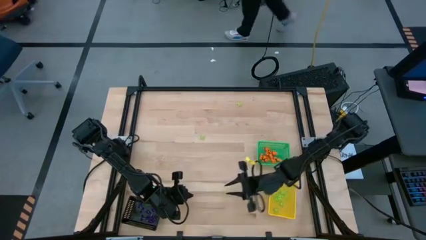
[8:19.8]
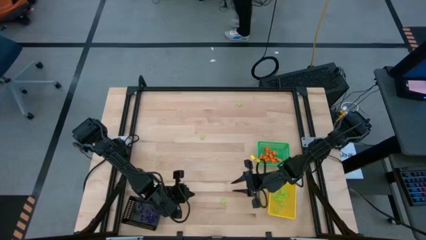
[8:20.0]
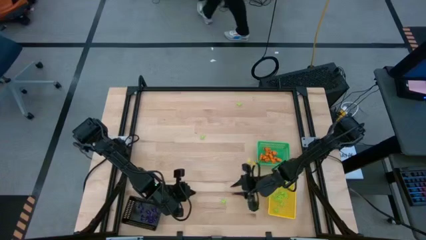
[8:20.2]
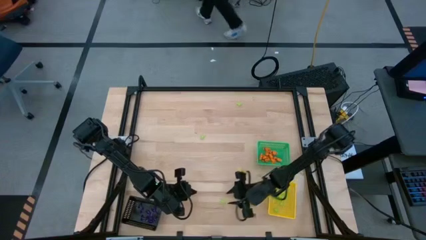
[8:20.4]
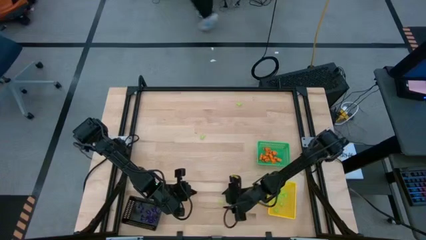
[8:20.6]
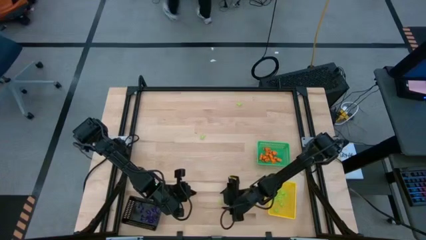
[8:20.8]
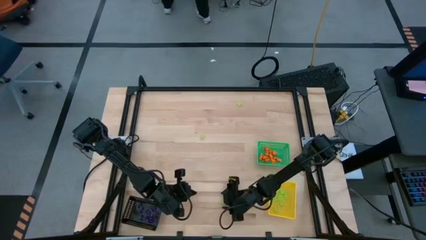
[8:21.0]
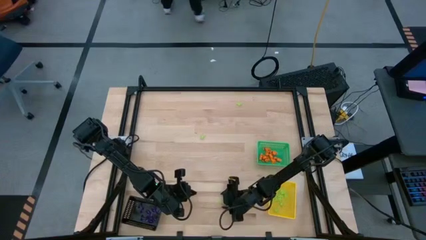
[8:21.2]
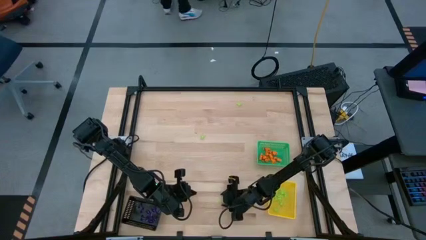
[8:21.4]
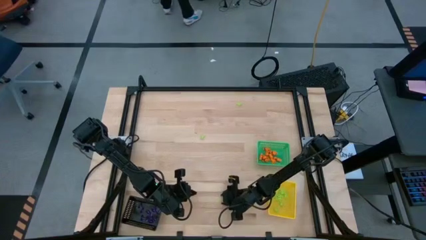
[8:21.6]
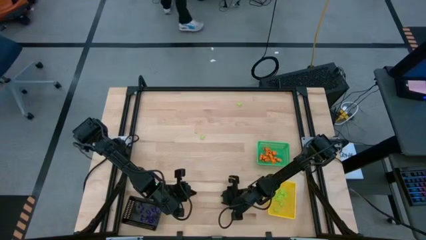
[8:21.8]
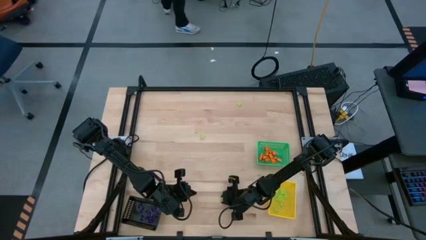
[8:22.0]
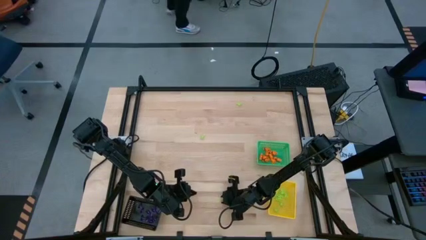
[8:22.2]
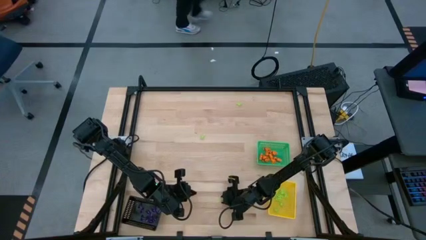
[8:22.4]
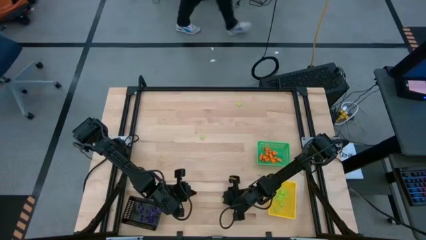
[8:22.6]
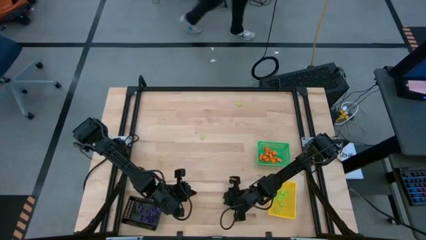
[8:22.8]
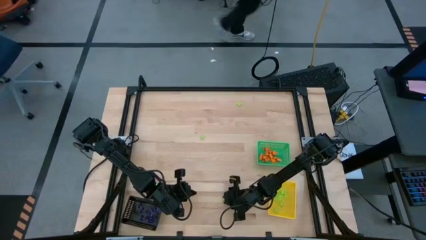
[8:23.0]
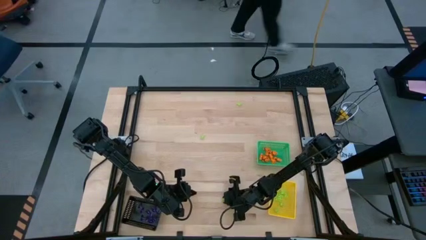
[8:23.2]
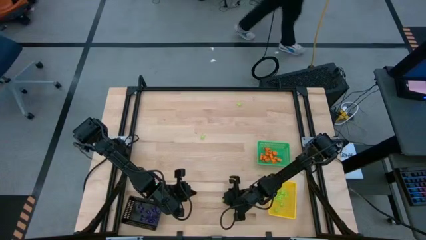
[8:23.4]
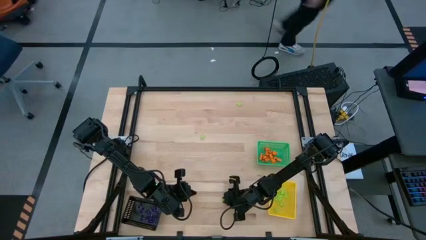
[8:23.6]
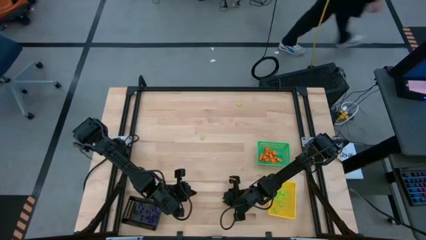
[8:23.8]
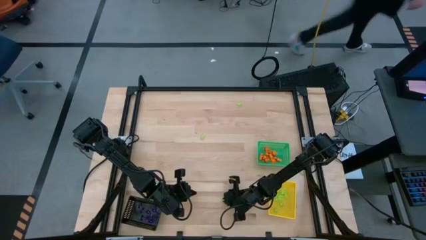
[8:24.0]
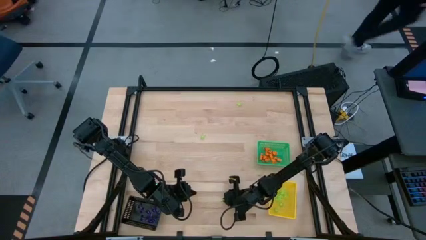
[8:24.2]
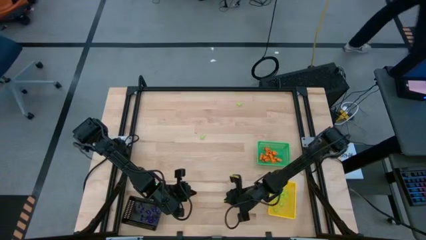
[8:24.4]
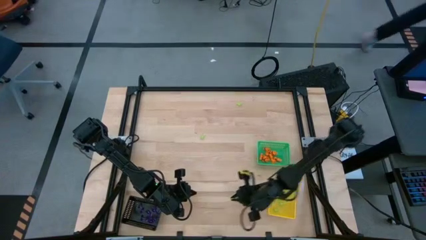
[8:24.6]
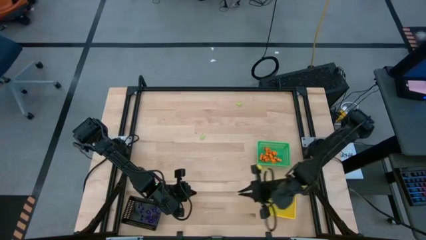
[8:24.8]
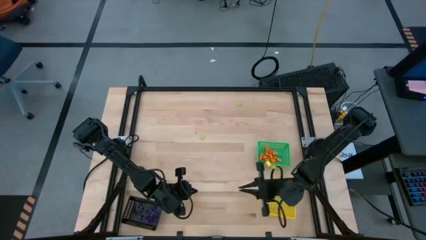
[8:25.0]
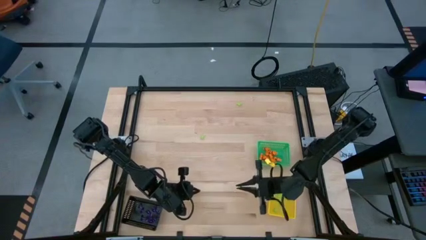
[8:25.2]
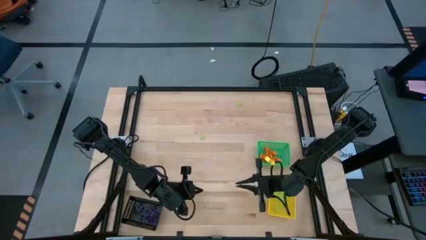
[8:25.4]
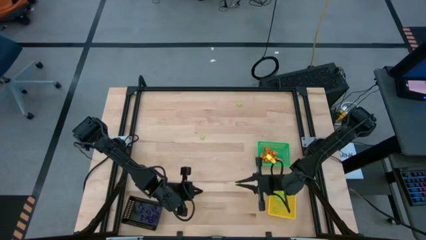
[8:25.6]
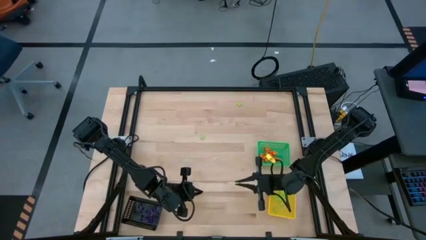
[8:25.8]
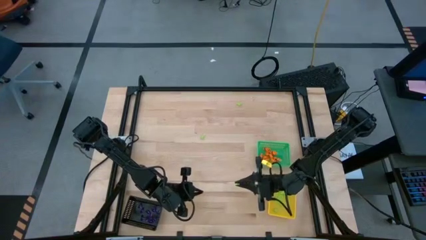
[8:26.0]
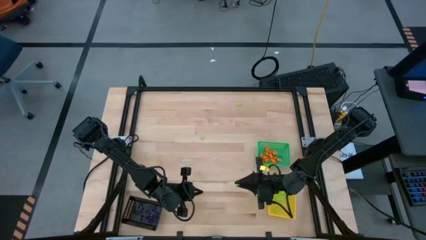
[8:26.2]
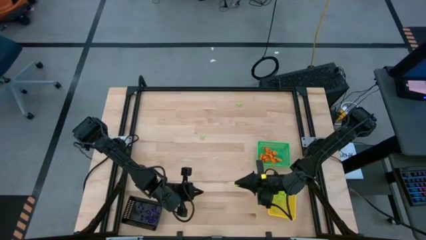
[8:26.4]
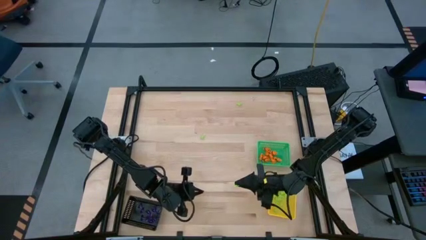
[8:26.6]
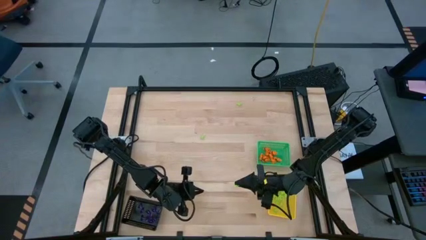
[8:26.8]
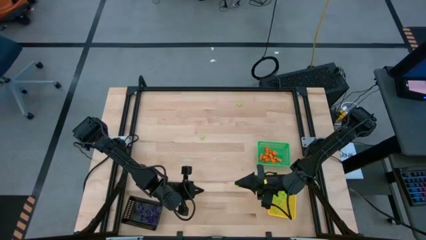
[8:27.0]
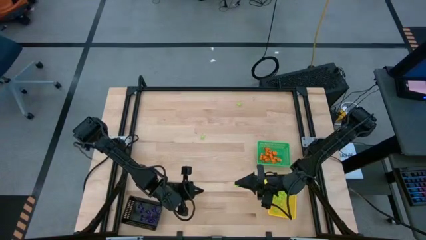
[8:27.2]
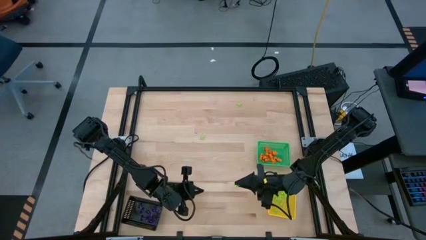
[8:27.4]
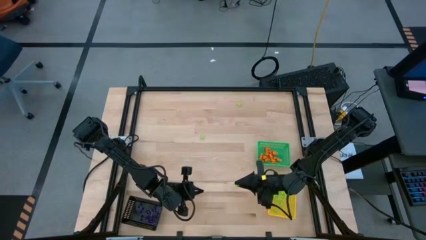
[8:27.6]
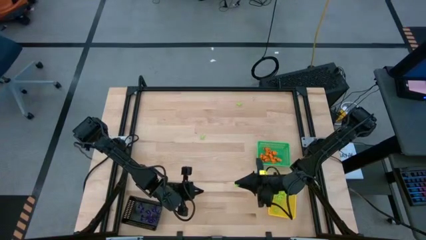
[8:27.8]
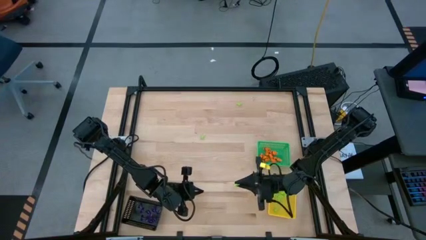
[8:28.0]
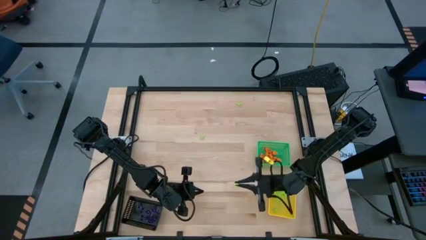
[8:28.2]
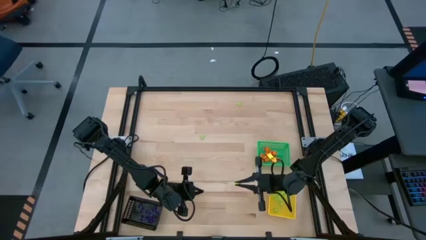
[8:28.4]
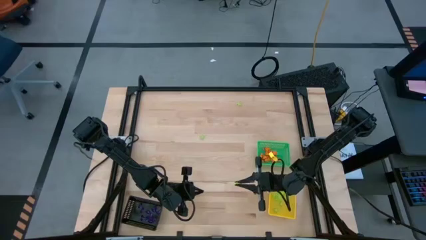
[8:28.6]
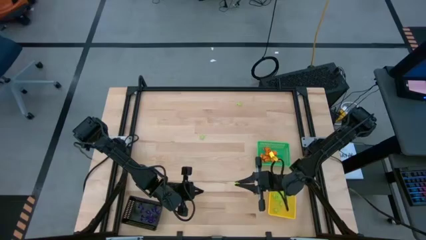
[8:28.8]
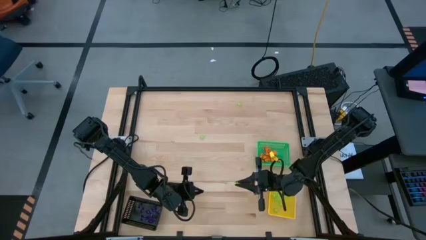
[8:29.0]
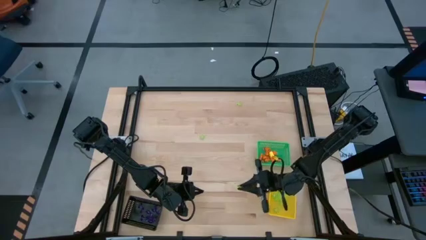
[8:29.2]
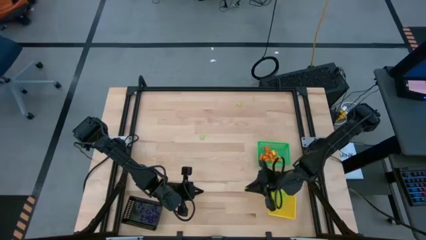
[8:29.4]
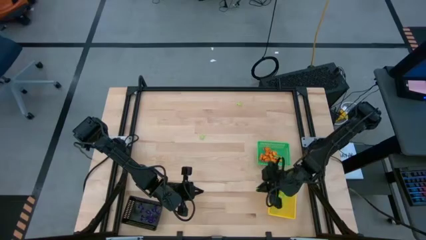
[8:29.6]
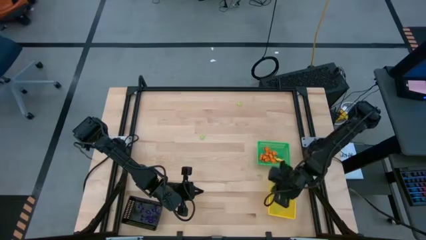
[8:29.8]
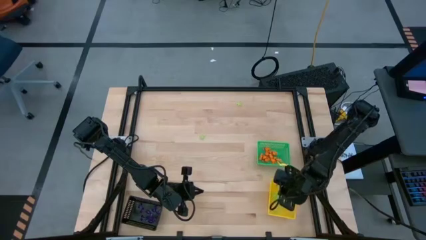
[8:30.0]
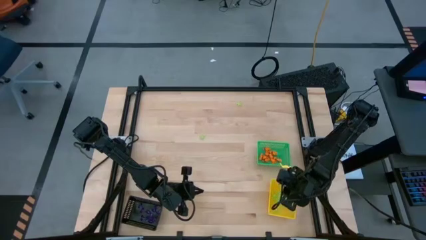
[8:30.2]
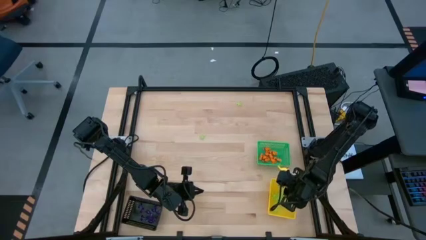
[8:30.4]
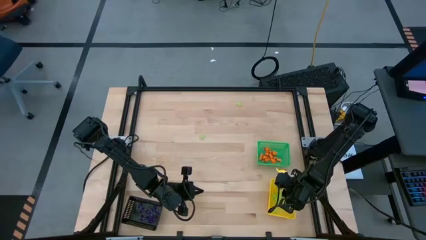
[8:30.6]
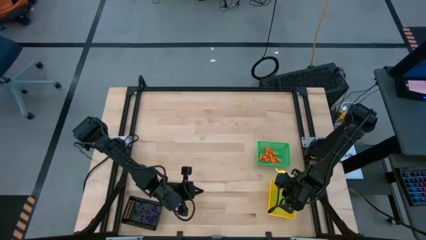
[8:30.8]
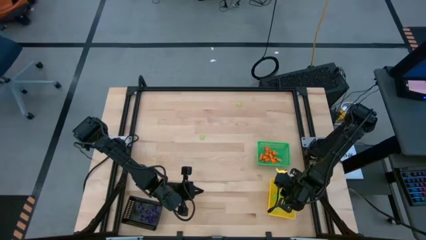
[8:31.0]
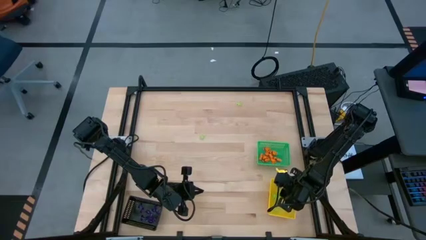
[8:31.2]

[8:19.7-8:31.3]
Task: Sort Halloween decoration
Put the green spider toy into the yellow bin
